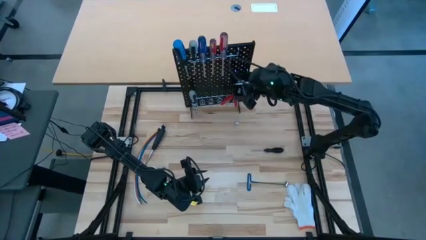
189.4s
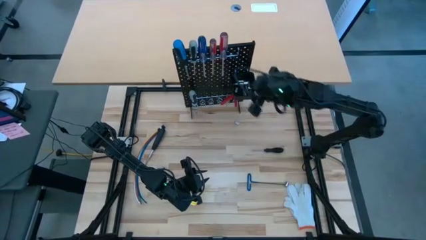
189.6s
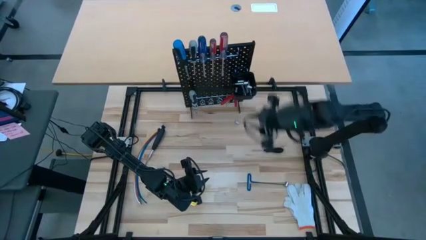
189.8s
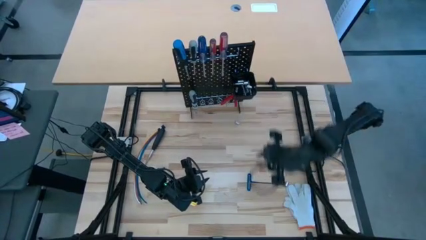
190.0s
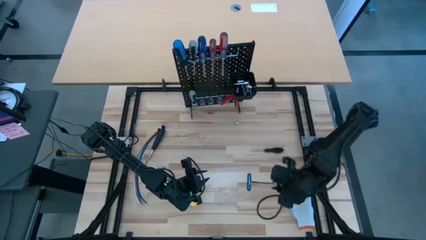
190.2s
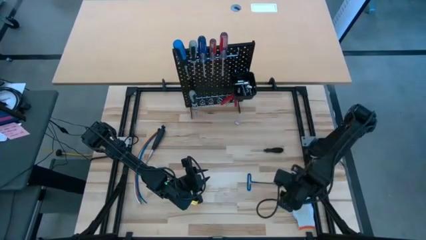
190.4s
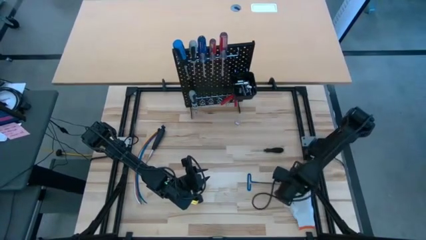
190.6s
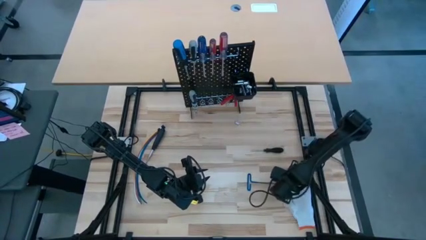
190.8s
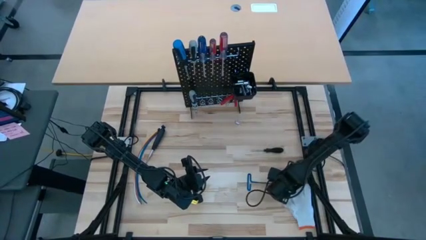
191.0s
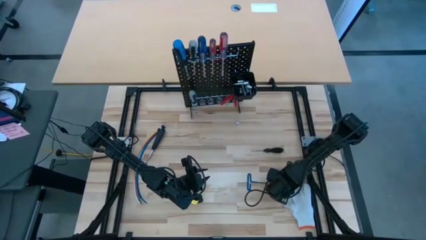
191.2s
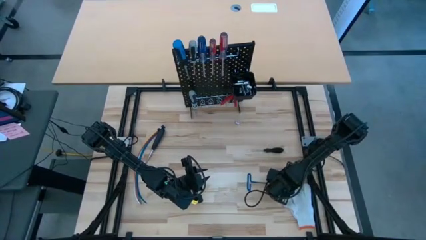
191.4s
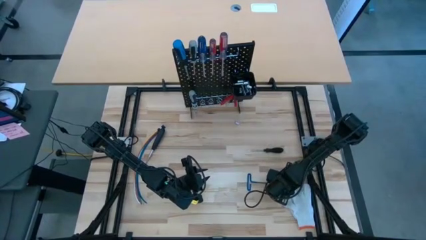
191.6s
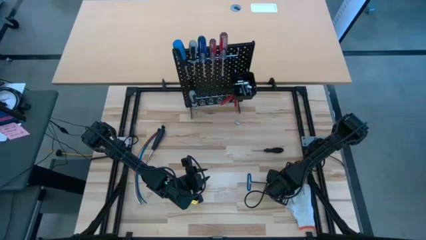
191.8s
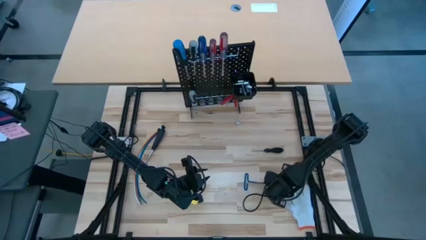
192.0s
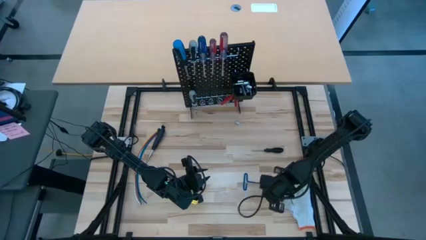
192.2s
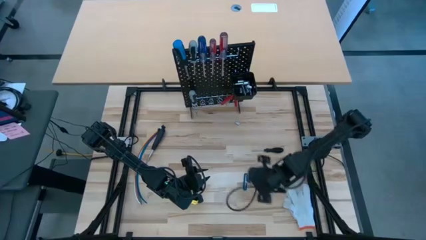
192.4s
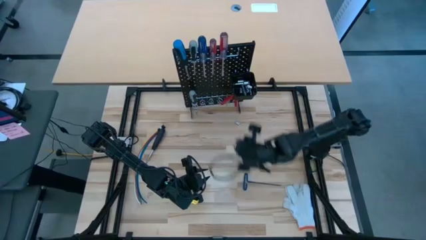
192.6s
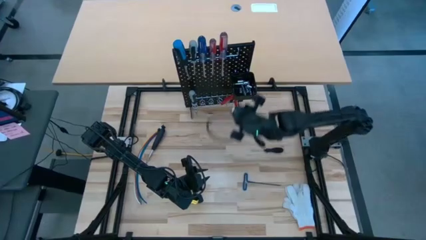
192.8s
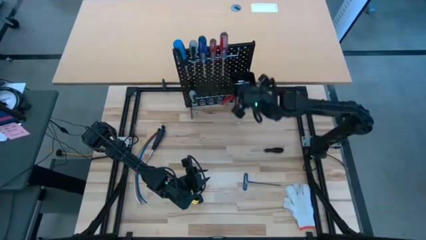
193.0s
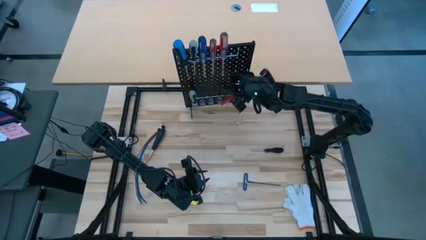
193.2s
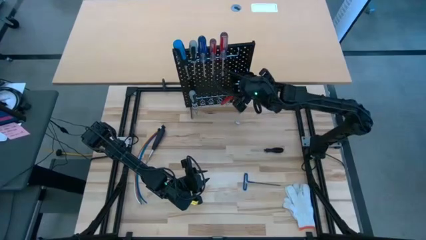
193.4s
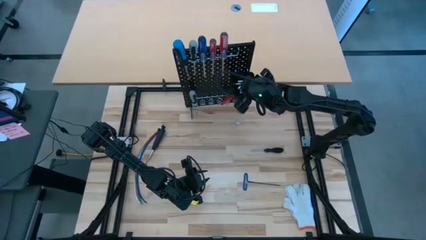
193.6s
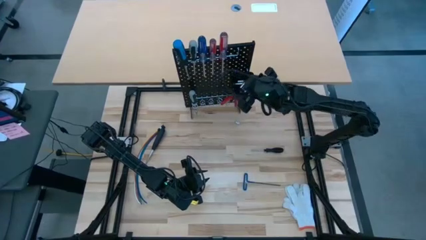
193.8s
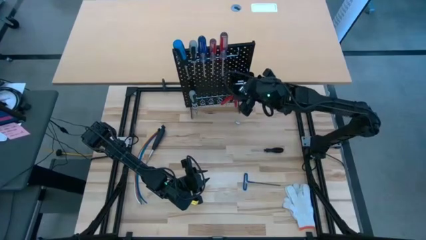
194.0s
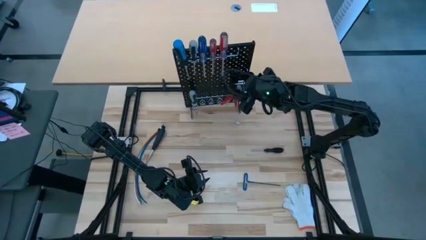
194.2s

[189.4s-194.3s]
Task: Hang tools onto peg board
Put the socket into the black bin on the pegboard

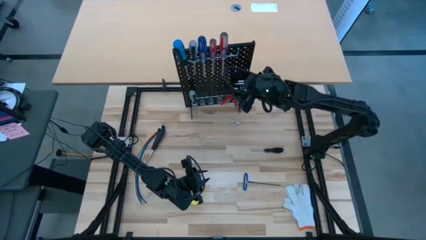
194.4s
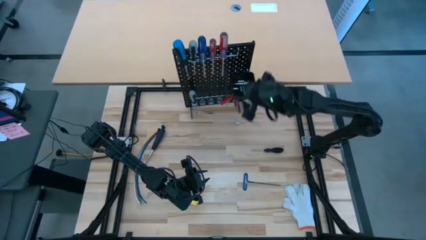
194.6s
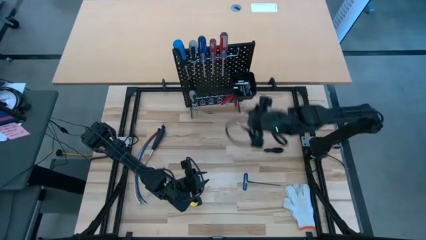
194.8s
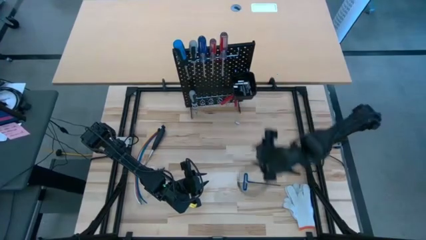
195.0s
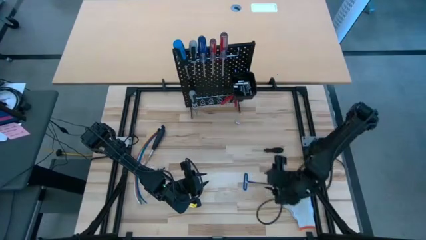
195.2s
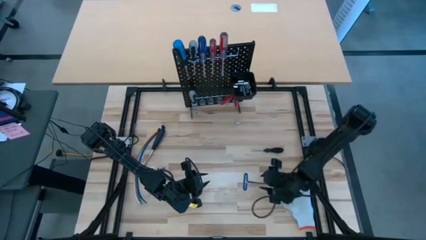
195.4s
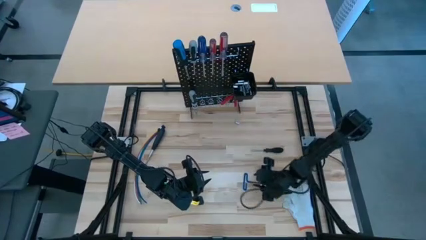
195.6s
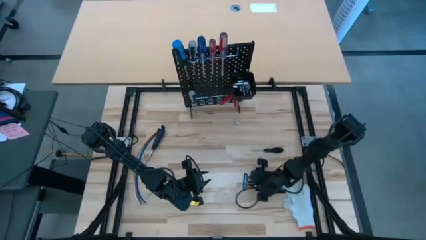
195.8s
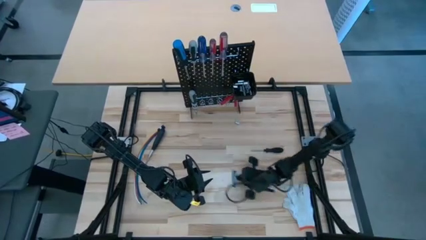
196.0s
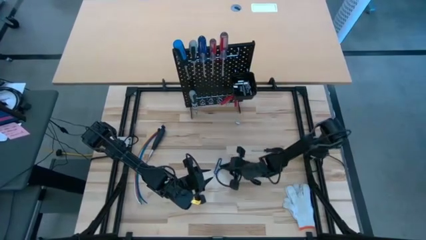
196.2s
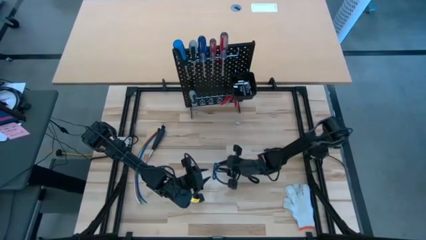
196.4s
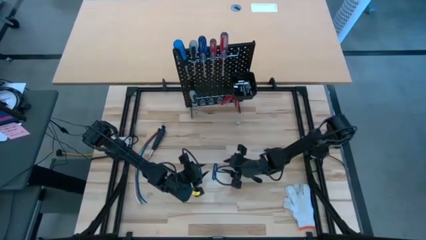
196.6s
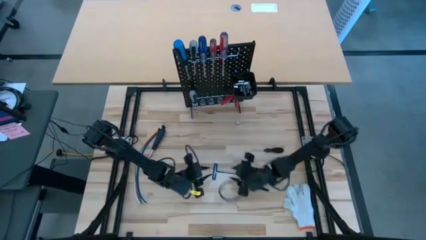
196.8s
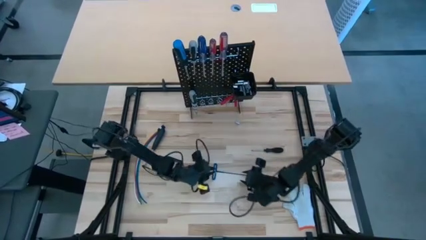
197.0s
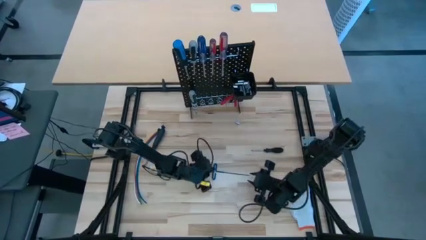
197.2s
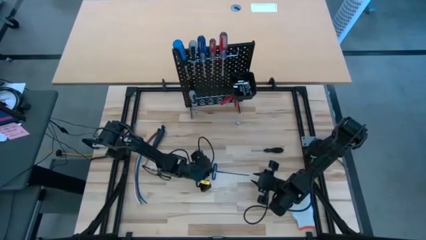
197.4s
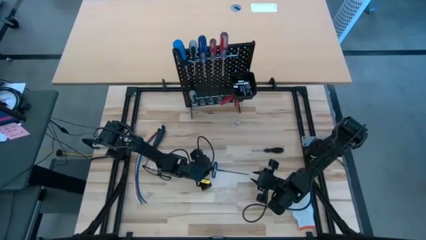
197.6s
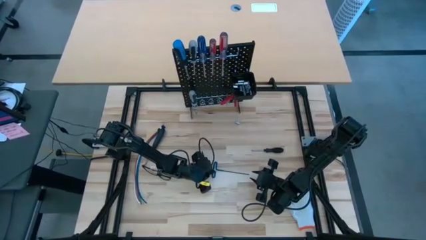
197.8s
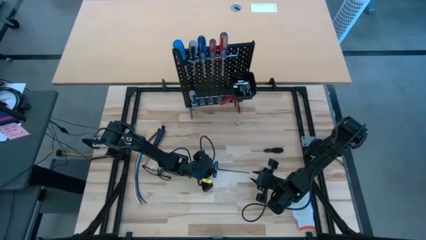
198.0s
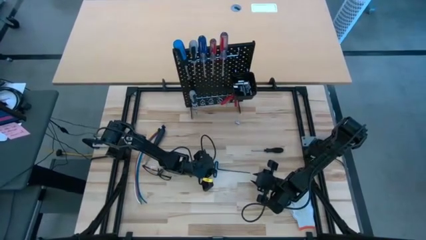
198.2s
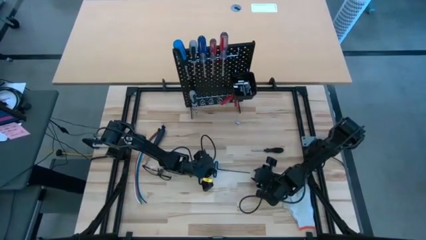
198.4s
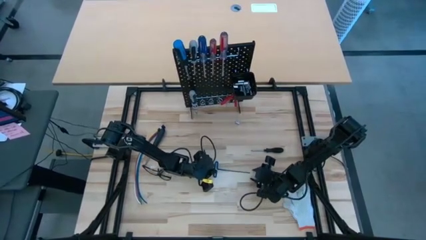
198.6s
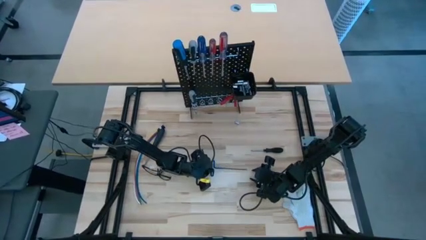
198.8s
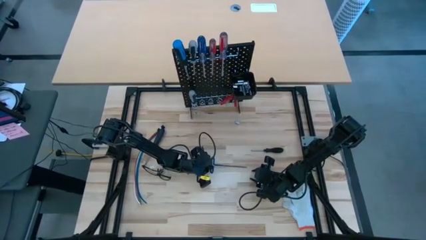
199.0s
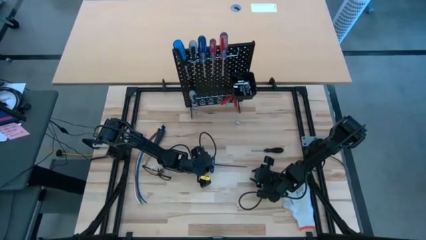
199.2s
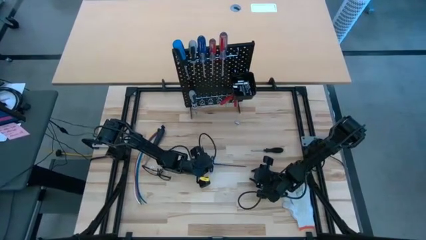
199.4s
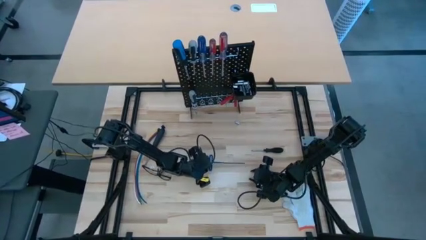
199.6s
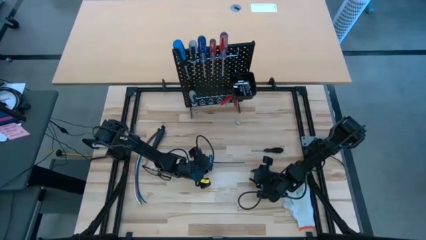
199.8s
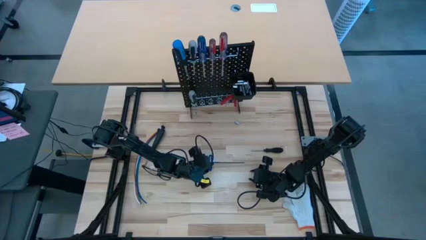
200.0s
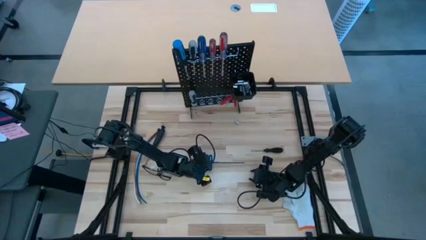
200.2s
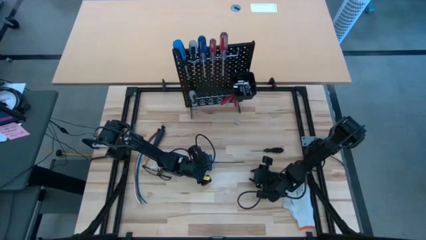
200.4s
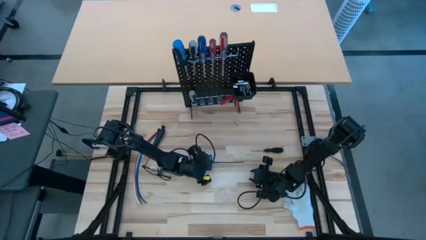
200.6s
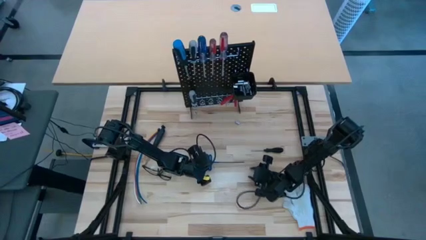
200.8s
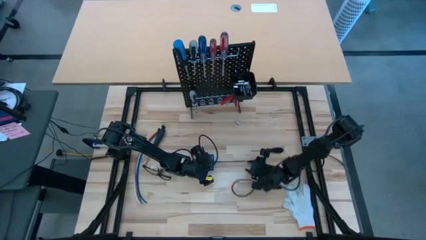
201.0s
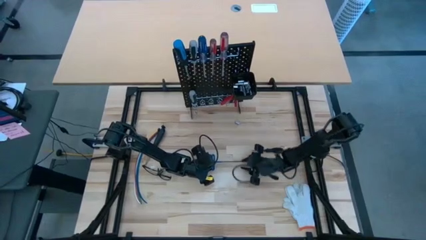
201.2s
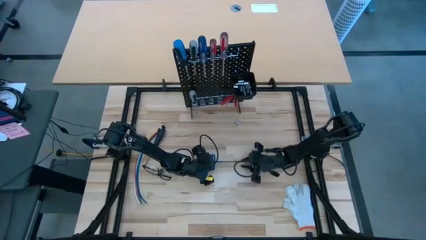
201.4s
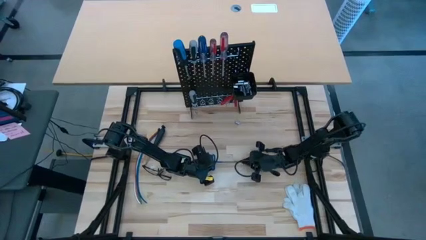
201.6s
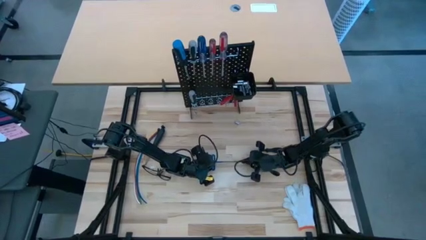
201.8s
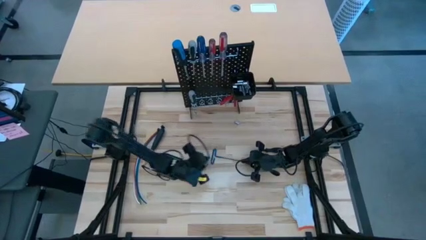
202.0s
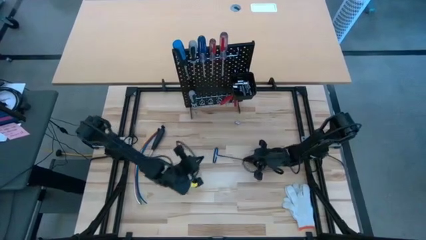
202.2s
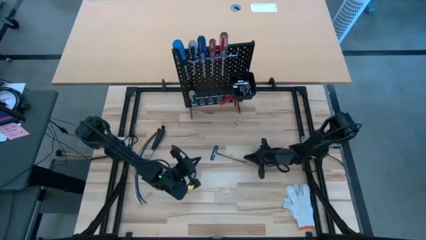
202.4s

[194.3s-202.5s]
Hang the pick tool on the pegboard

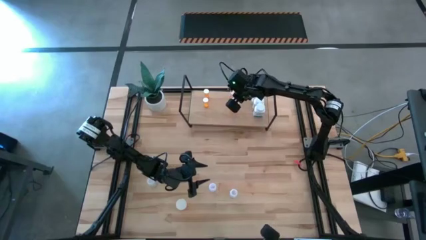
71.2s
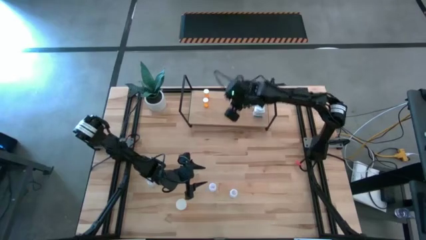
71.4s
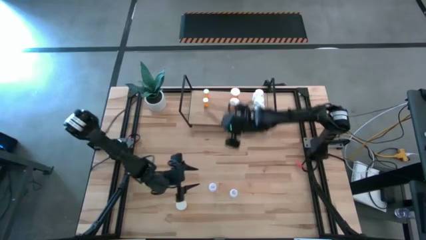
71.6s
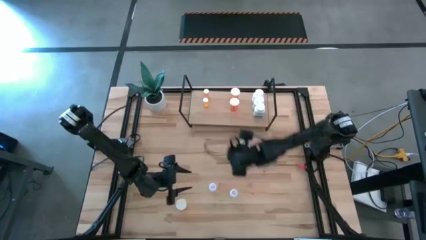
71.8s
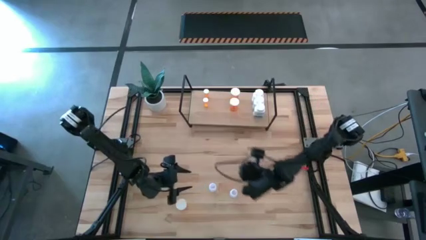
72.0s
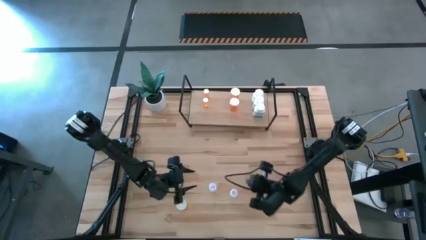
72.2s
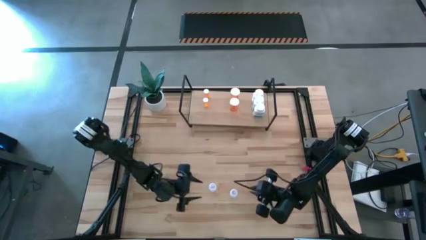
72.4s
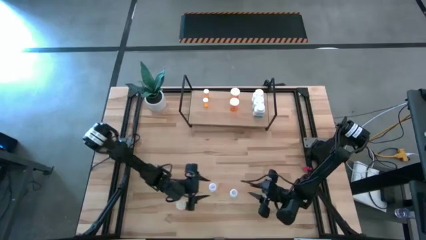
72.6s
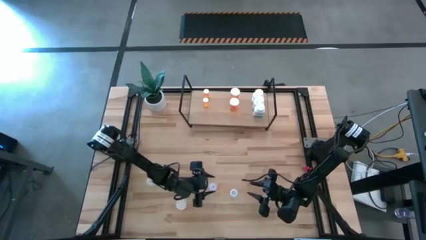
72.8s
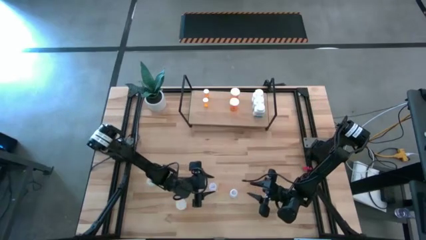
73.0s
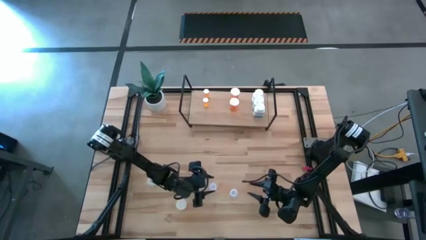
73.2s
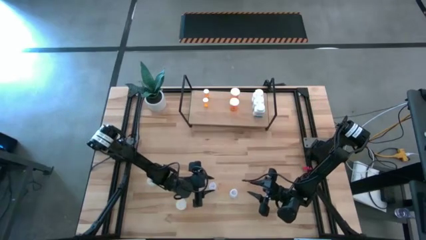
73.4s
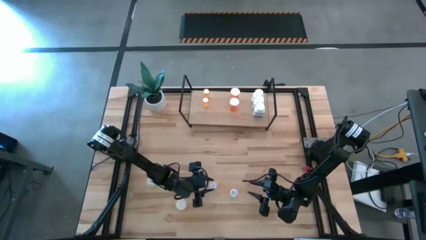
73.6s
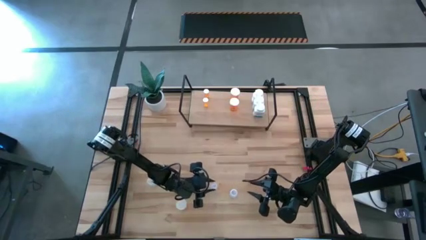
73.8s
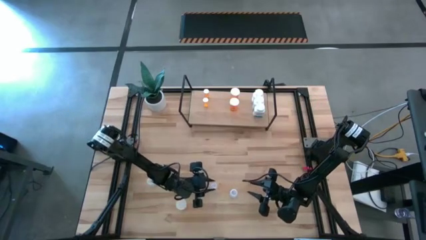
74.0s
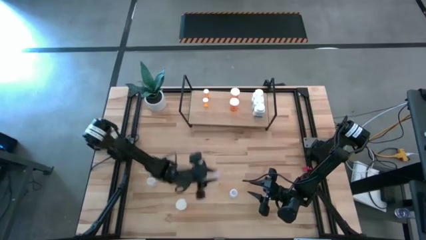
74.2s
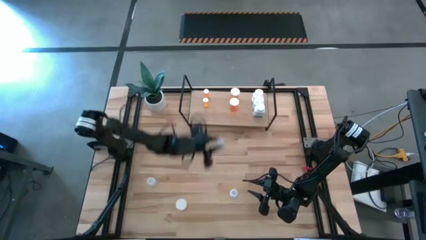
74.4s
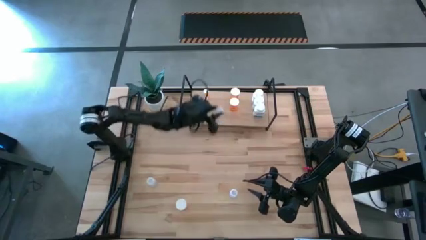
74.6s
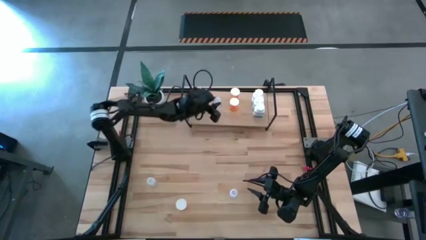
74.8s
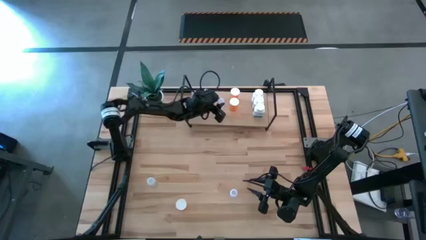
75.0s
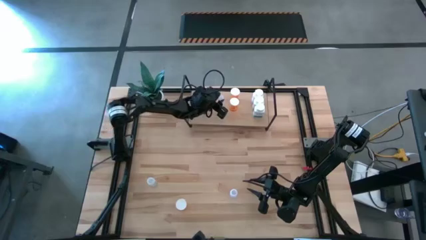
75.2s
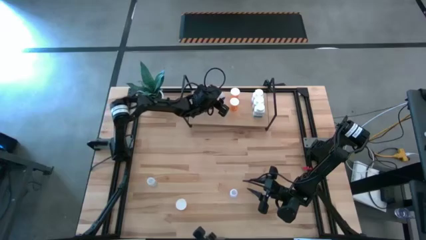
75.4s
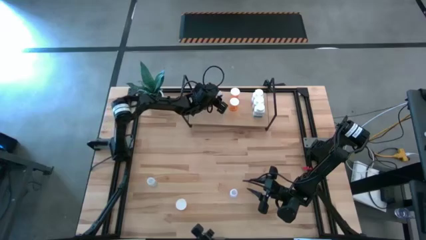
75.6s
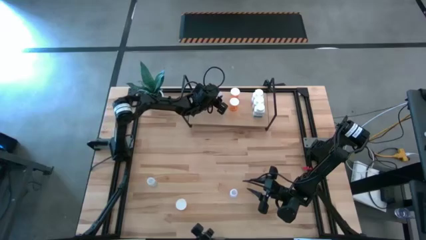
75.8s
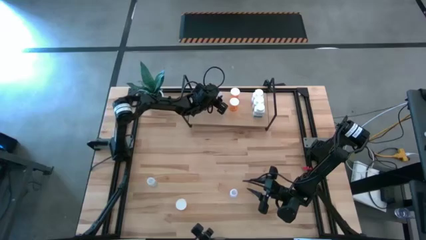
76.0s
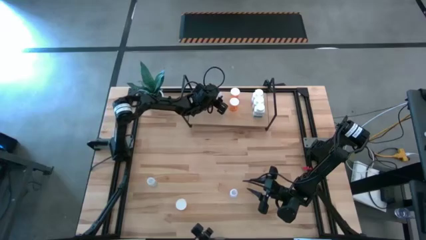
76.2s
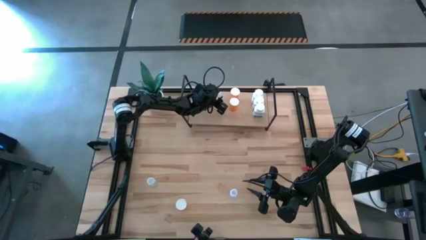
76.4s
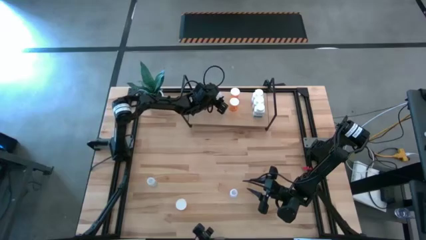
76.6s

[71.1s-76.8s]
Task: Pick and place medicine bottles onto shelf by color
Put the middle transparent medicine bottle on the shelf
